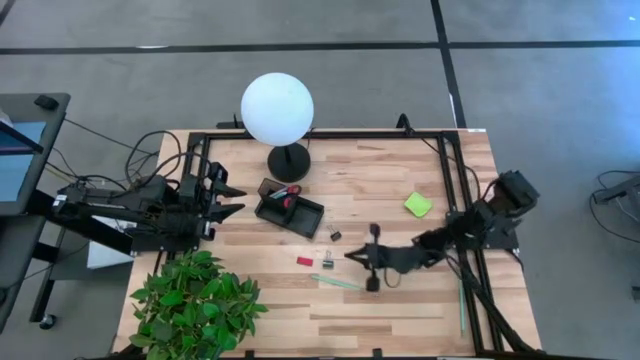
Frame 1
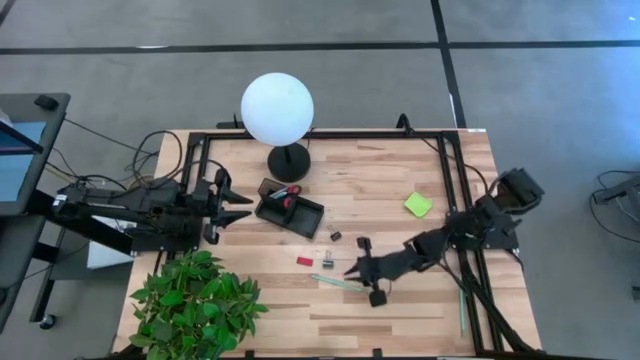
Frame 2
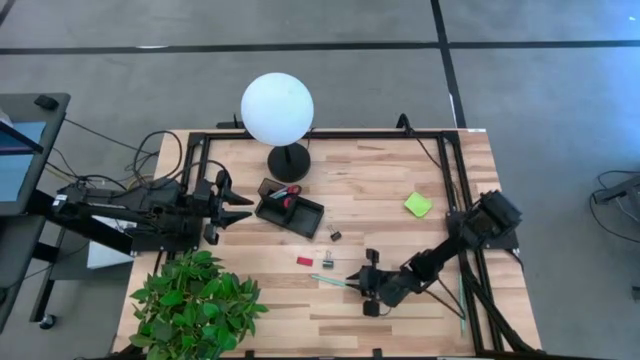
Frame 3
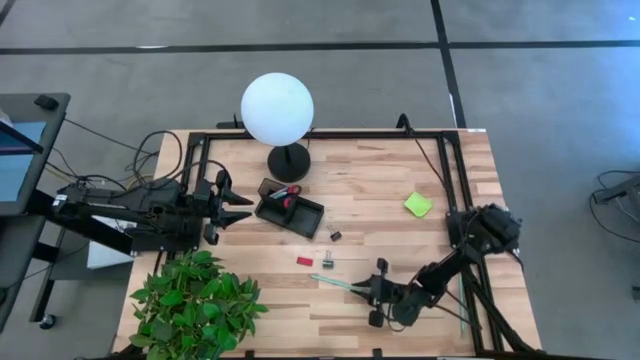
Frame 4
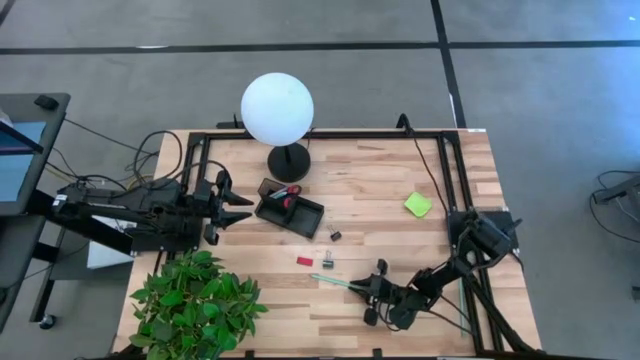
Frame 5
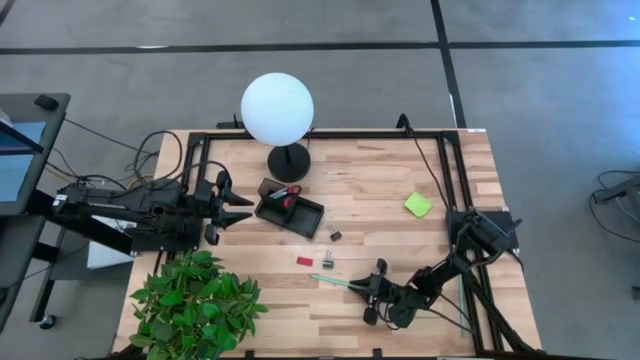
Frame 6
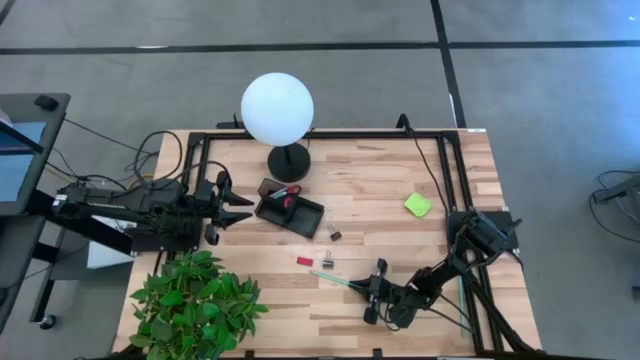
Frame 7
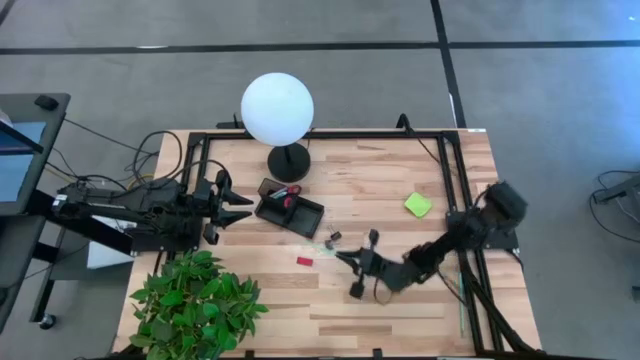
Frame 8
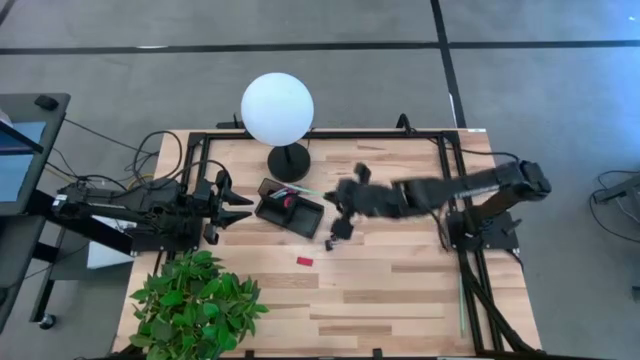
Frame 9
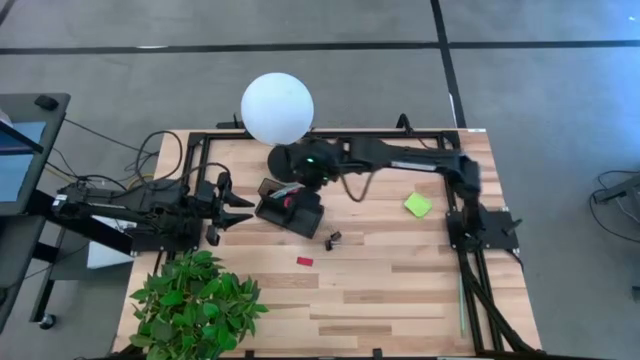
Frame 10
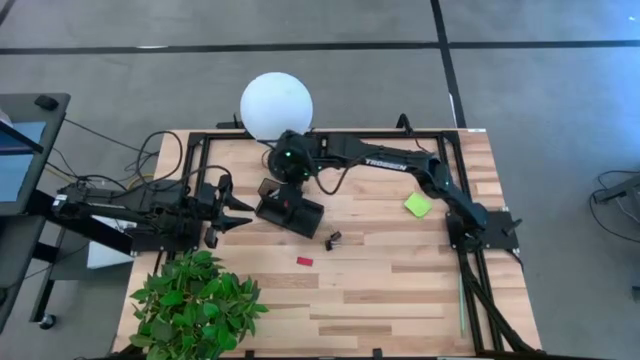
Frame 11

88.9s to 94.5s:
Task: Pick and place office supplies into organizer
Put the left blue pencil into the black desk organizer

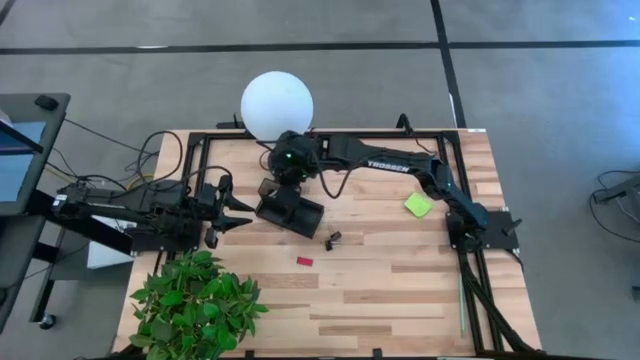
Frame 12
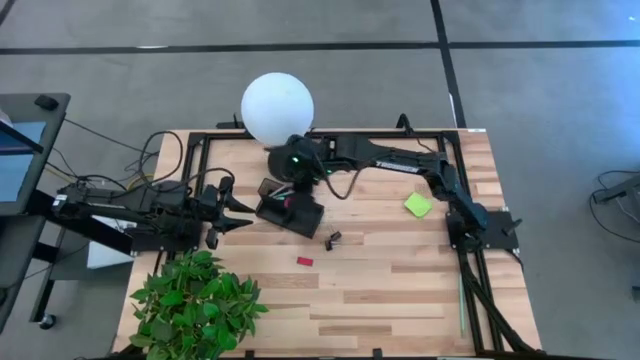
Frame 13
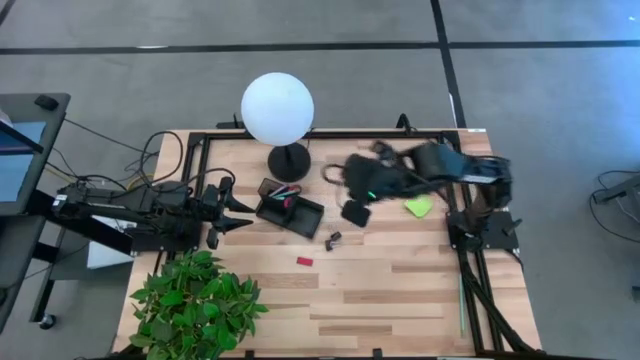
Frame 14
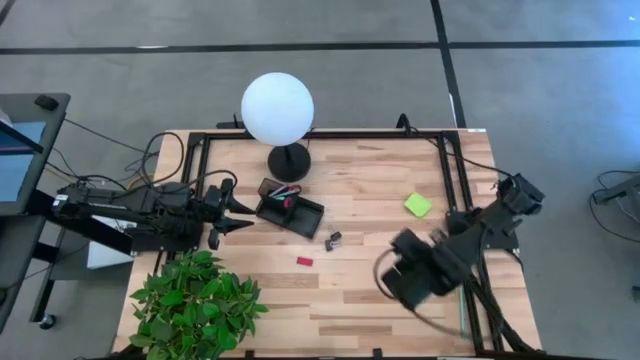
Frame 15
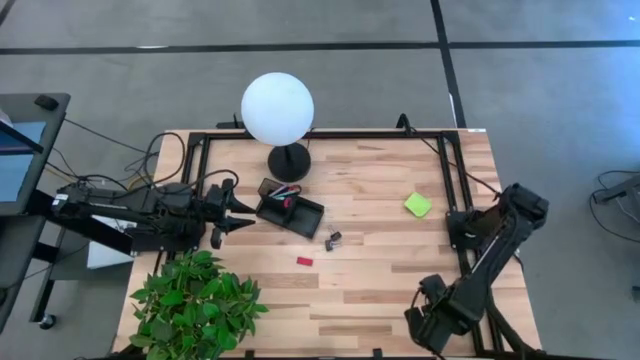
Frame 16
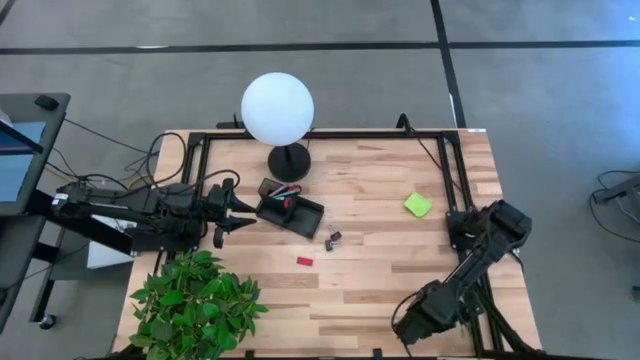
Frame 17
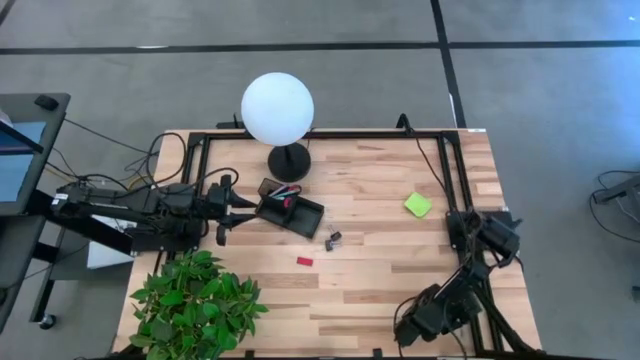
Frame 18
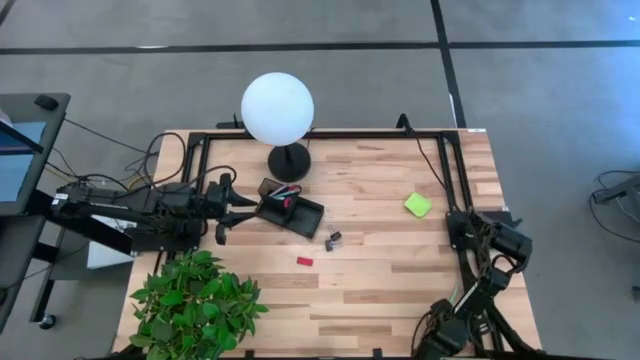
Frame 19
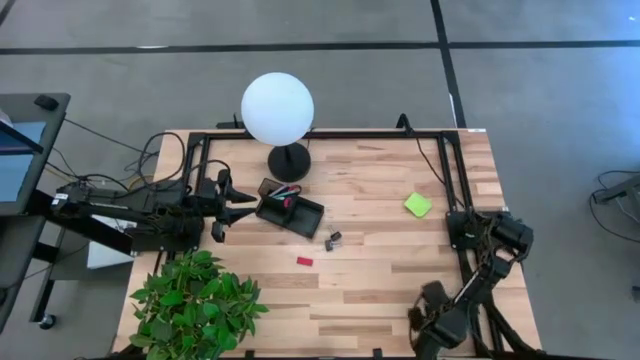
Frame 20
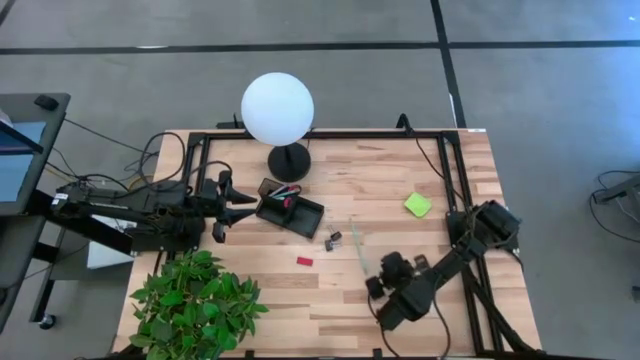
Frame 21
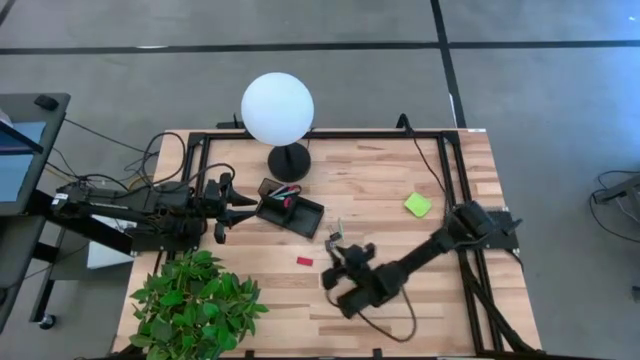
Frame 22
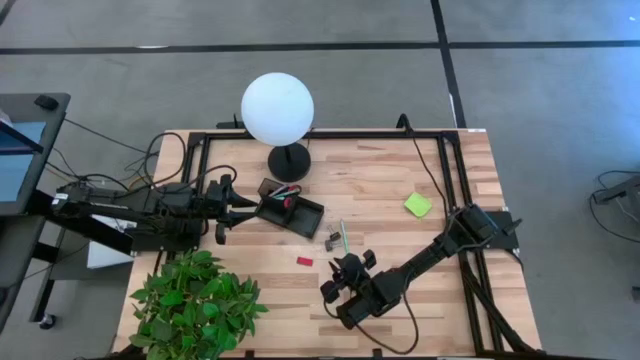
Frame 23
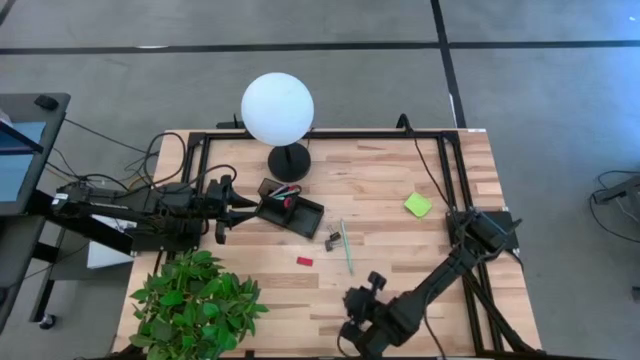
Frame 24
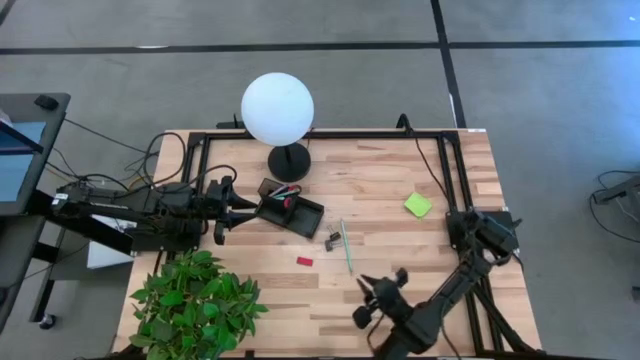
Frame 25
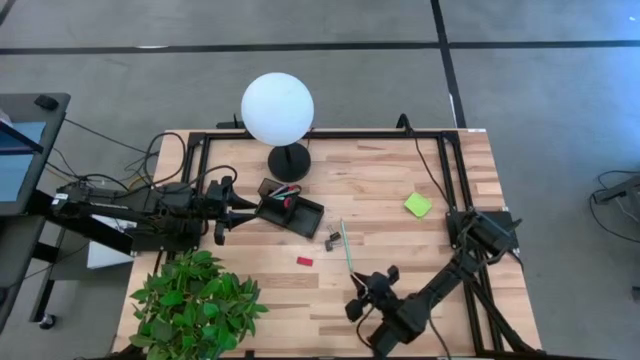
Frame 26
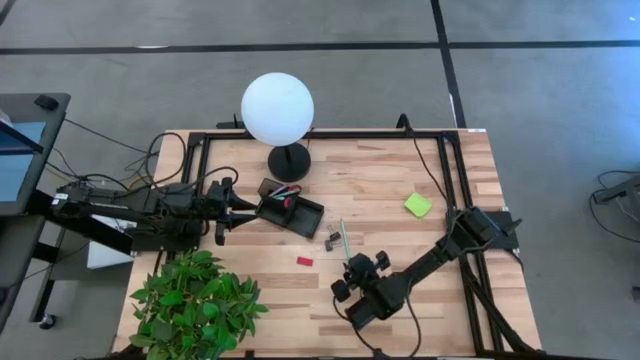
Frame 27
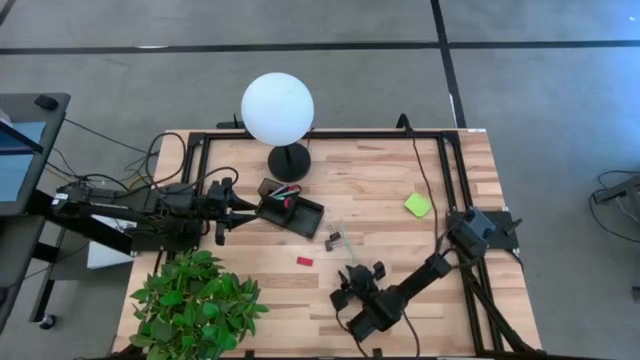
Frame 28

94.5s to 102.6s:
Put the blue pencil into the black desk organizer

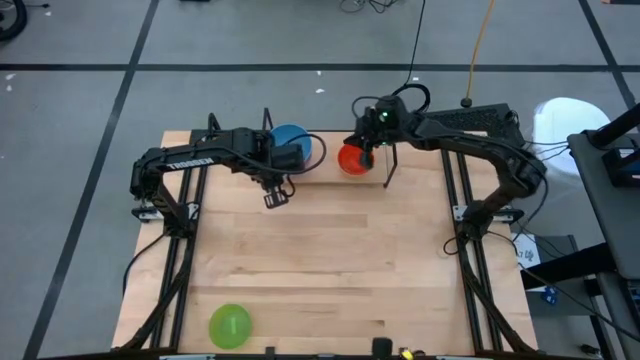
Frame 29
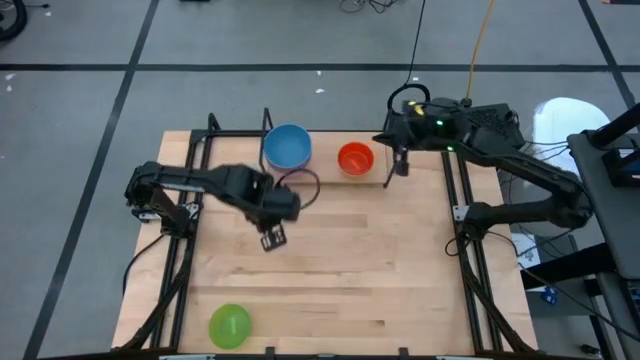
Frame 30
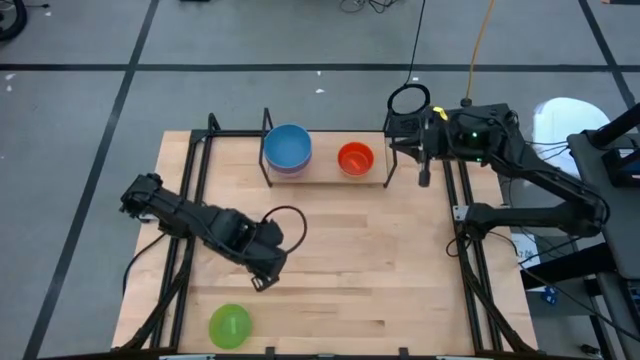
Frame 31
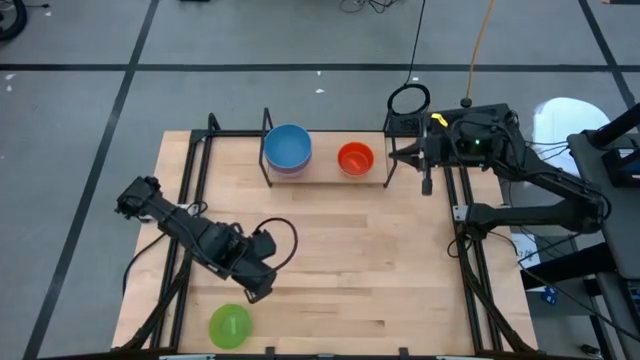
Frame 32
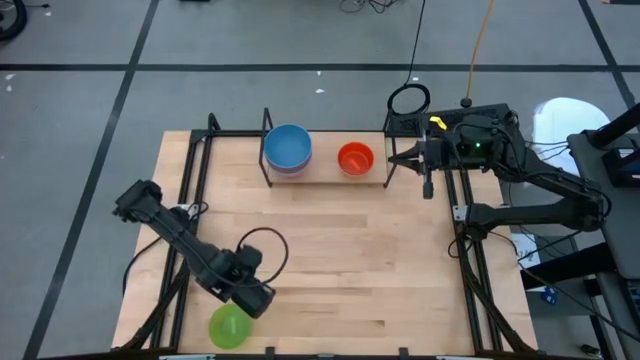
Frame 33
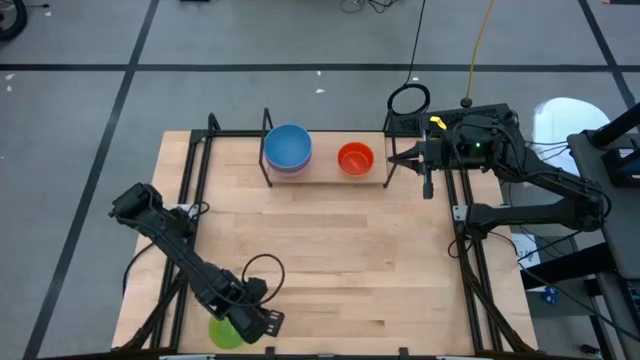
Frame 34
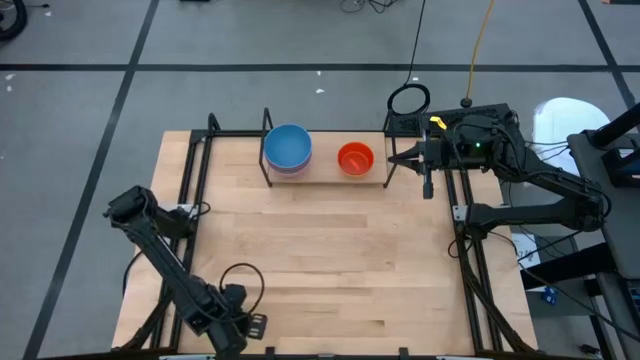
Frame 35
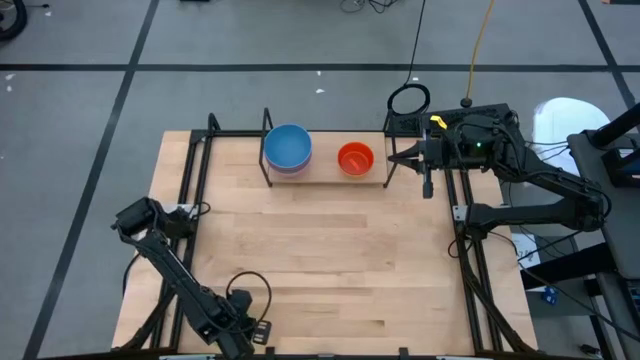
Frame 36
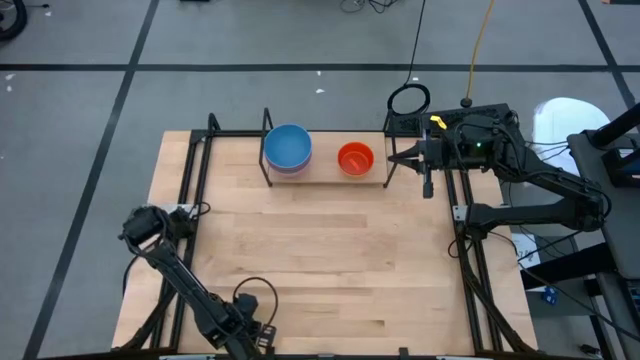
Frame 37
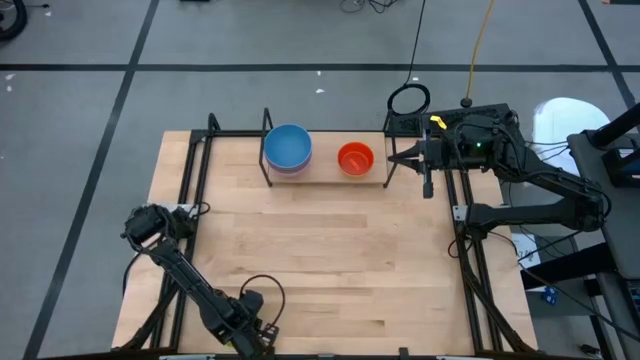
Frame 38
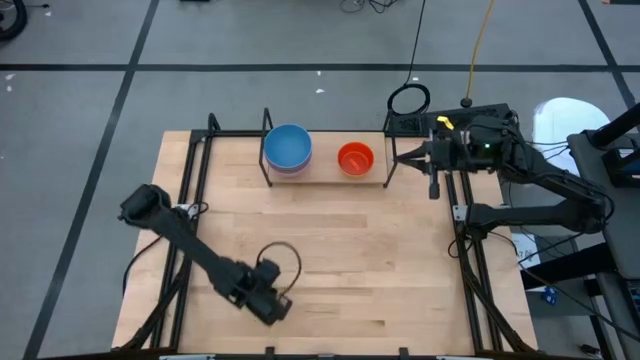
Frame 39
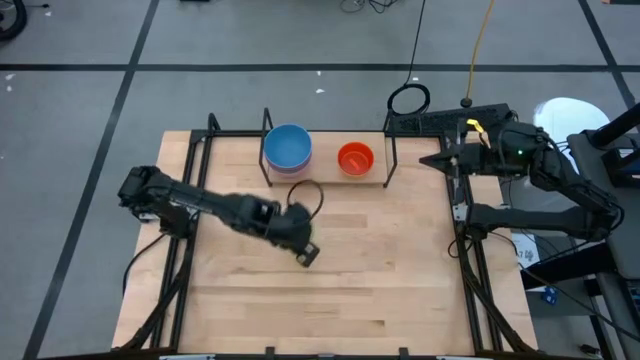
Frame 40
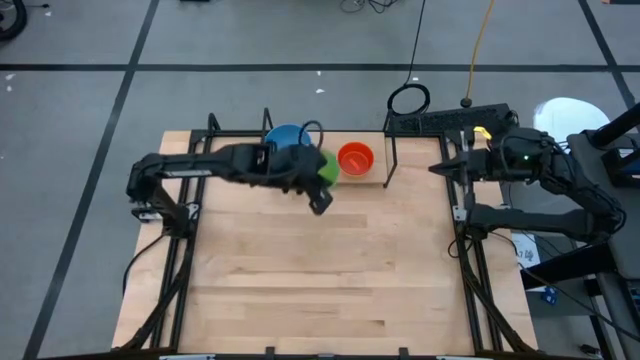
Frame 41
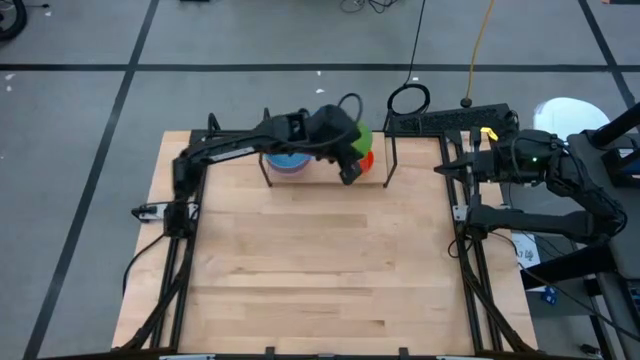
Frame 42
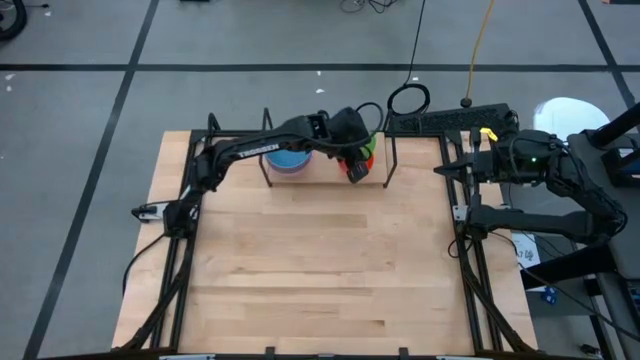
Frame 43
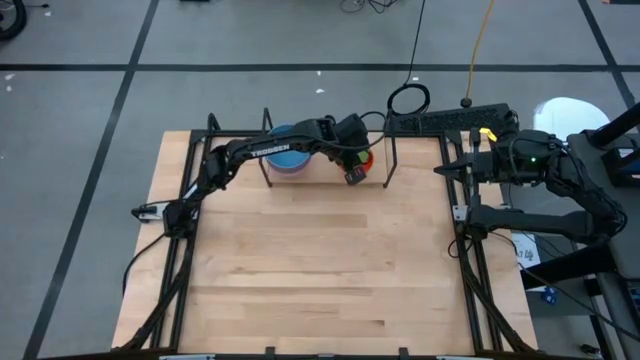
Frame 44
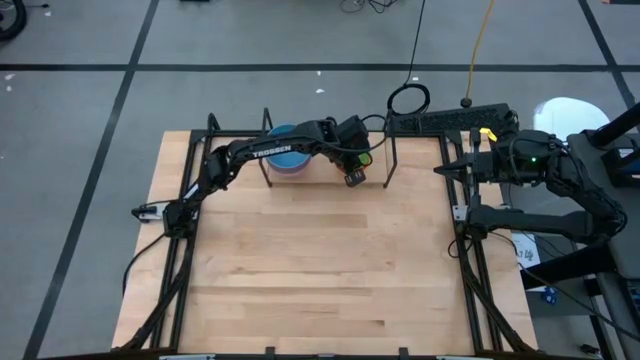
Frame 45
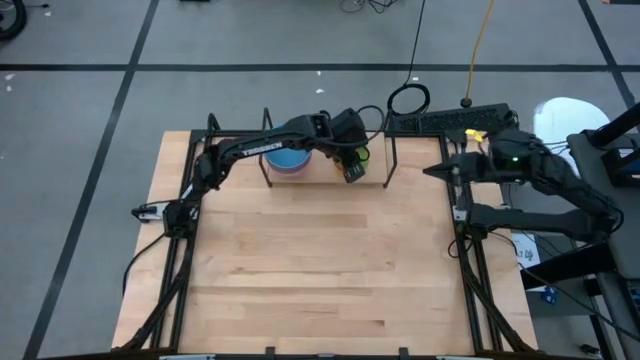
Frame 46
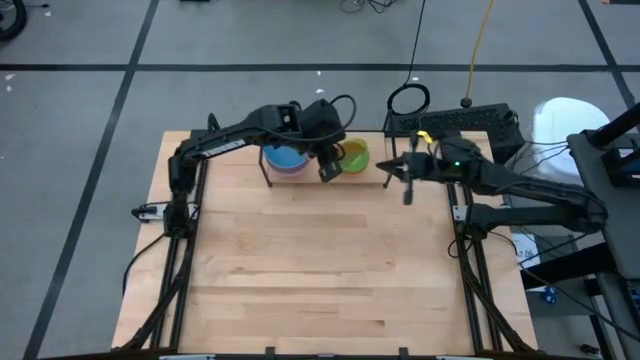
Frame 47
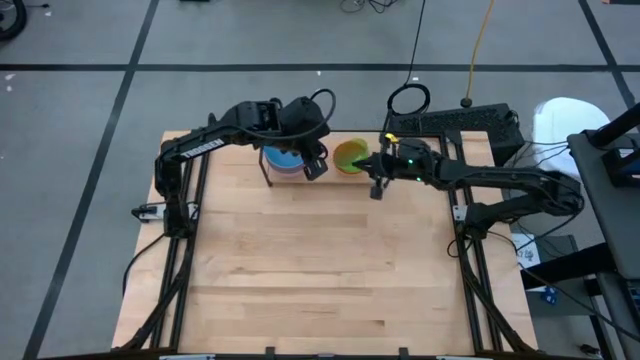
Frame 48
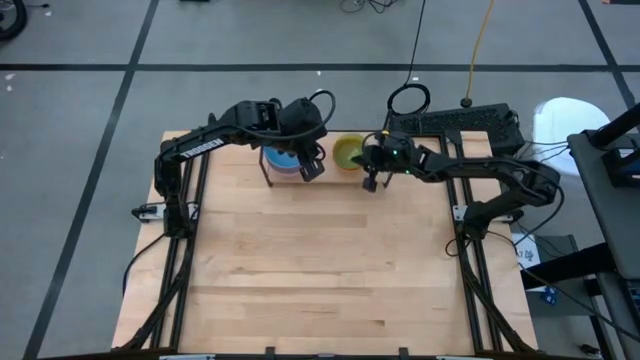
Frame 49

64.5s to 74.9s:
Task: Place and stack bowls onto a shelf
Stack the green bowl on top of the orange bowl on the shelf
